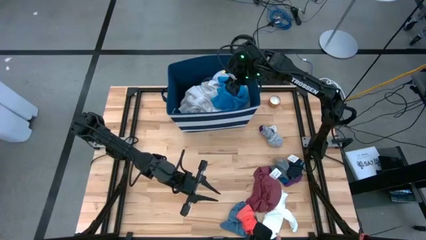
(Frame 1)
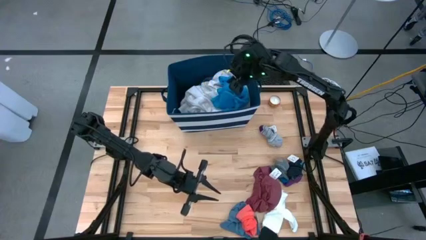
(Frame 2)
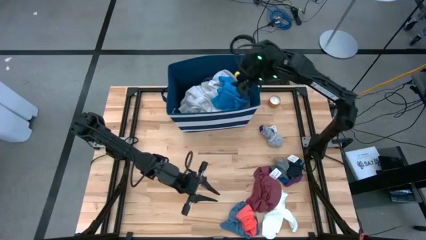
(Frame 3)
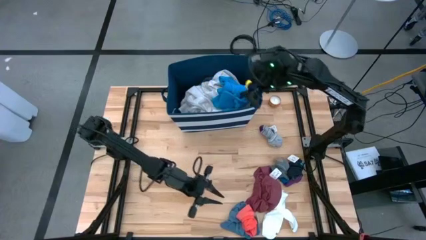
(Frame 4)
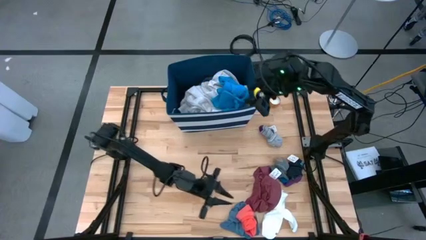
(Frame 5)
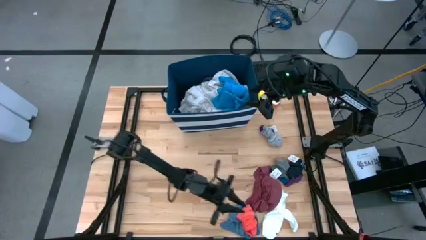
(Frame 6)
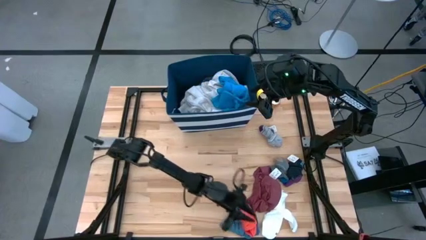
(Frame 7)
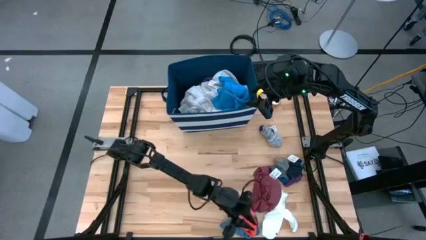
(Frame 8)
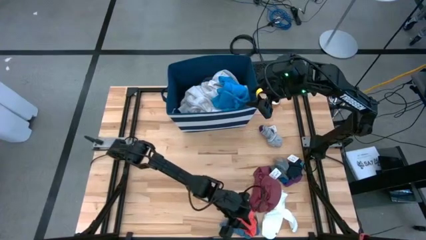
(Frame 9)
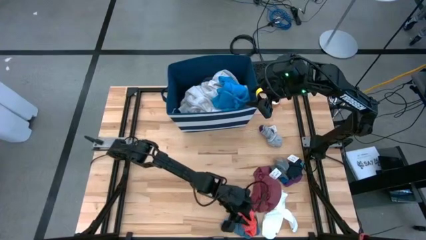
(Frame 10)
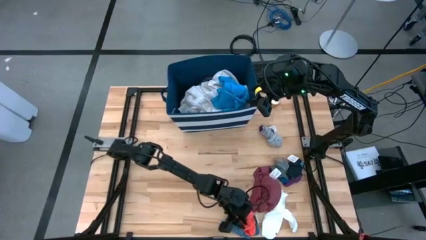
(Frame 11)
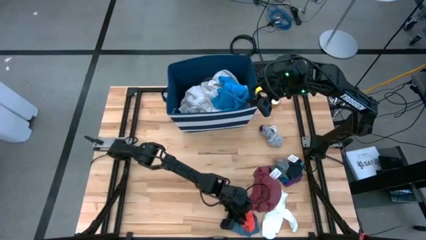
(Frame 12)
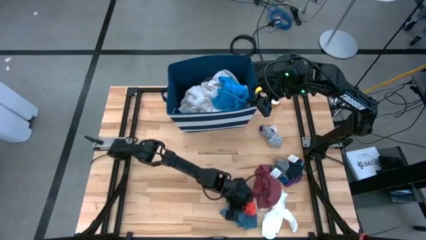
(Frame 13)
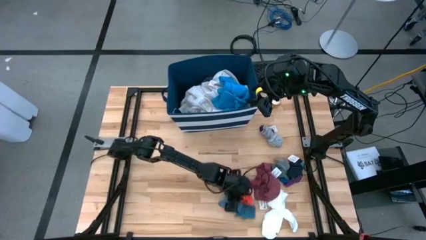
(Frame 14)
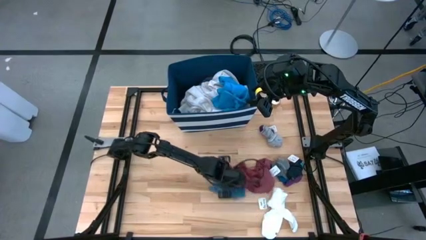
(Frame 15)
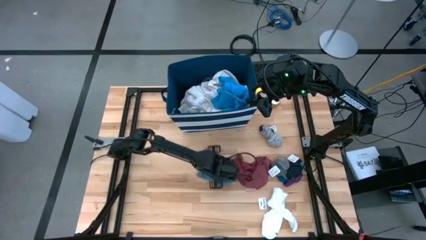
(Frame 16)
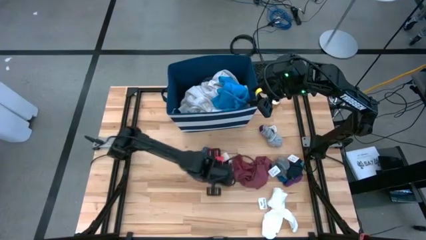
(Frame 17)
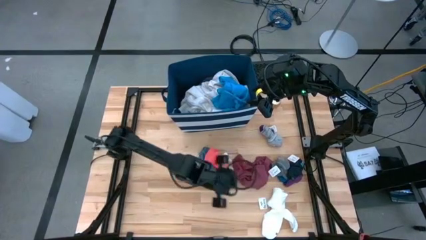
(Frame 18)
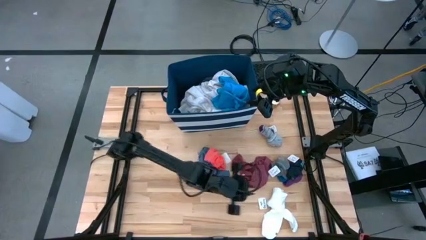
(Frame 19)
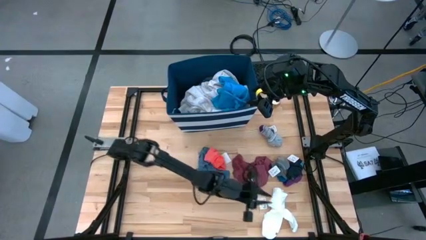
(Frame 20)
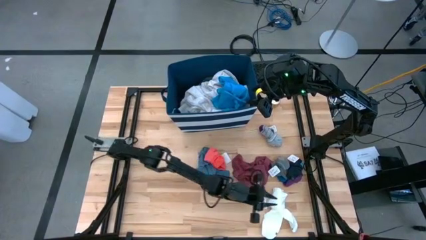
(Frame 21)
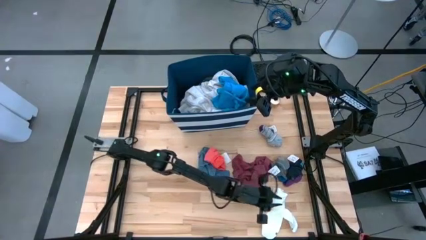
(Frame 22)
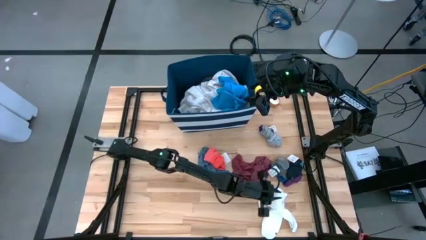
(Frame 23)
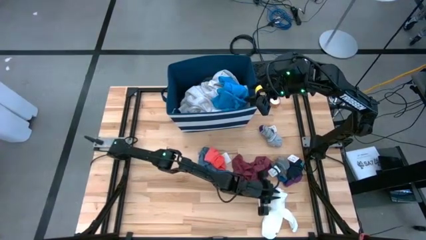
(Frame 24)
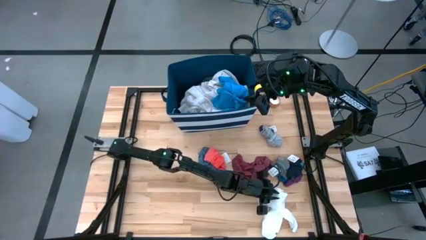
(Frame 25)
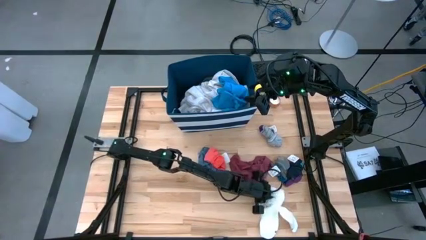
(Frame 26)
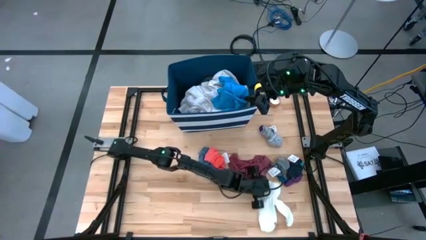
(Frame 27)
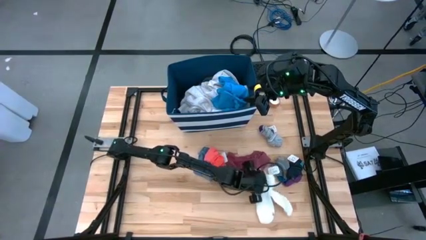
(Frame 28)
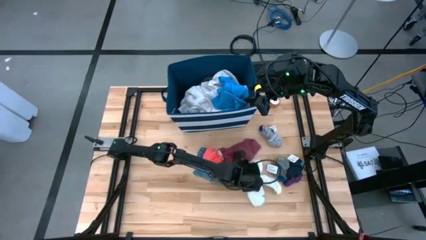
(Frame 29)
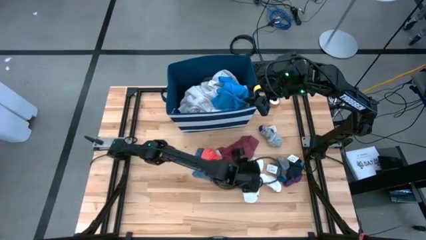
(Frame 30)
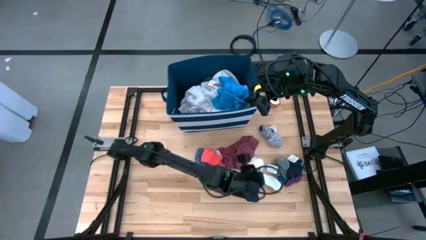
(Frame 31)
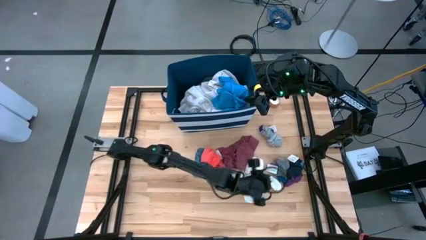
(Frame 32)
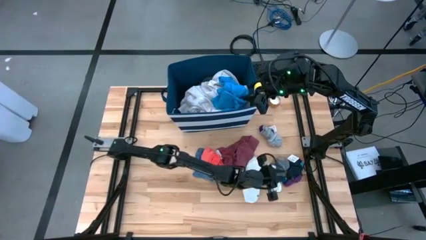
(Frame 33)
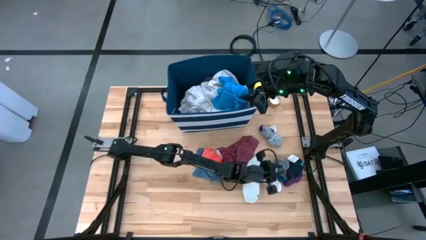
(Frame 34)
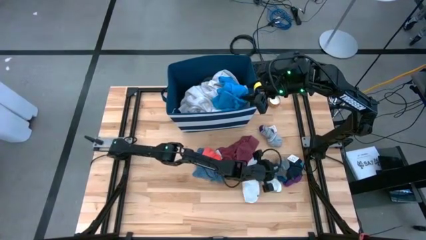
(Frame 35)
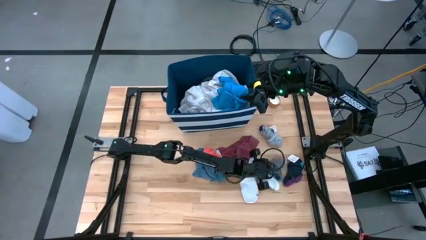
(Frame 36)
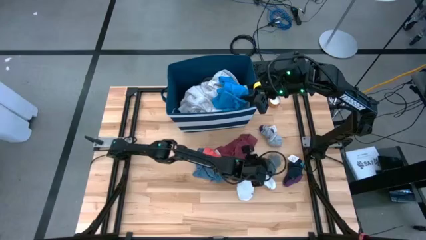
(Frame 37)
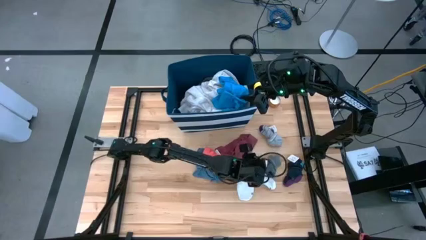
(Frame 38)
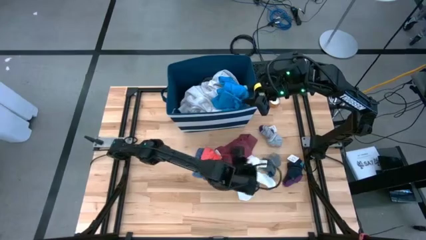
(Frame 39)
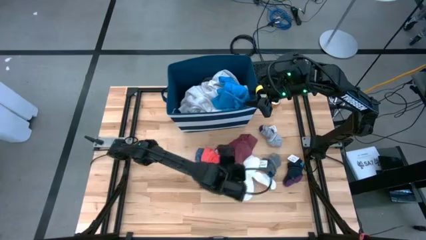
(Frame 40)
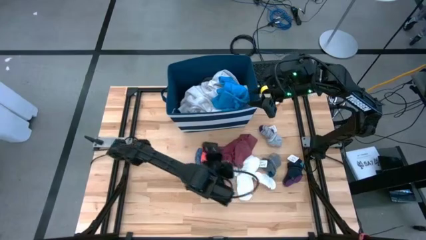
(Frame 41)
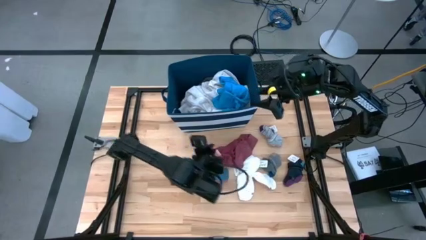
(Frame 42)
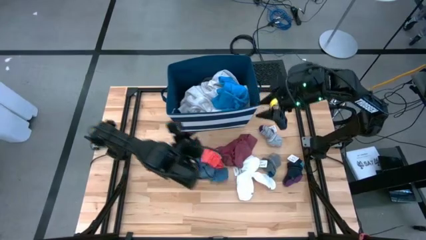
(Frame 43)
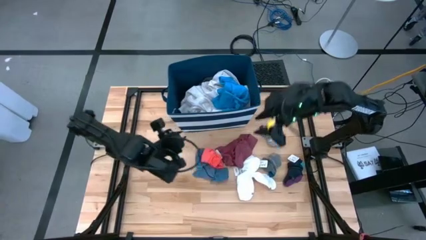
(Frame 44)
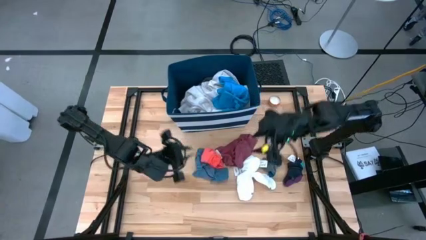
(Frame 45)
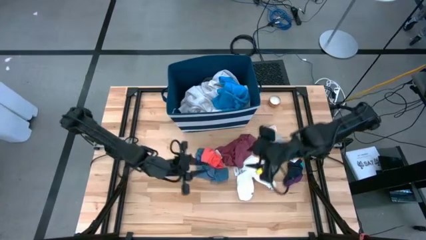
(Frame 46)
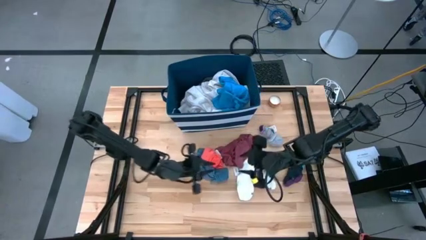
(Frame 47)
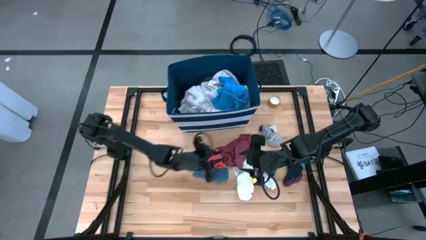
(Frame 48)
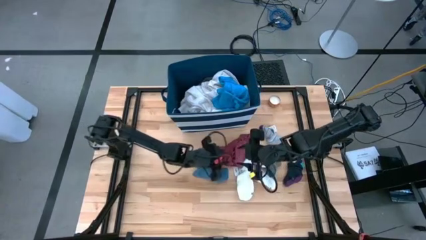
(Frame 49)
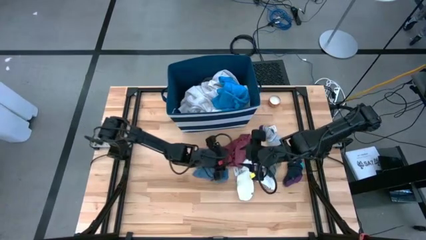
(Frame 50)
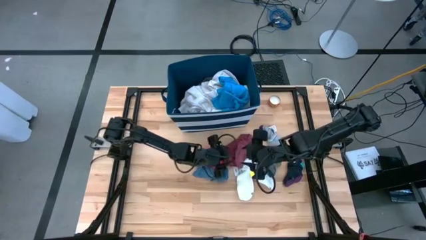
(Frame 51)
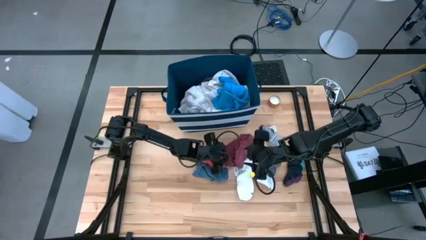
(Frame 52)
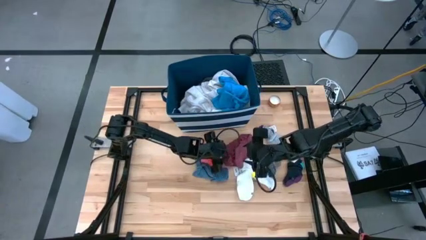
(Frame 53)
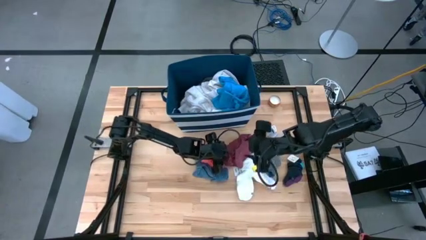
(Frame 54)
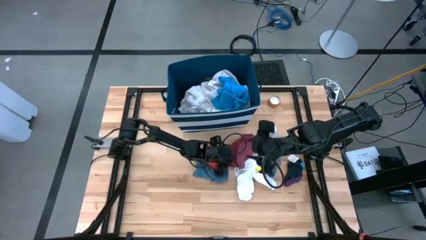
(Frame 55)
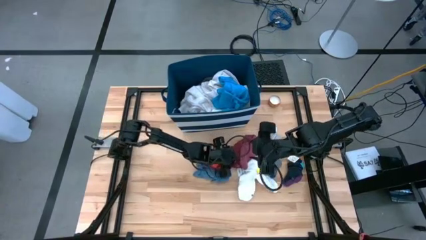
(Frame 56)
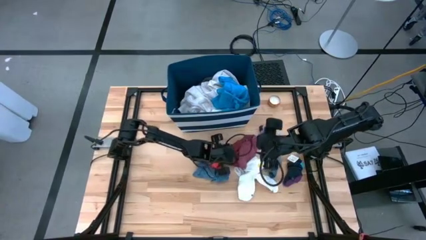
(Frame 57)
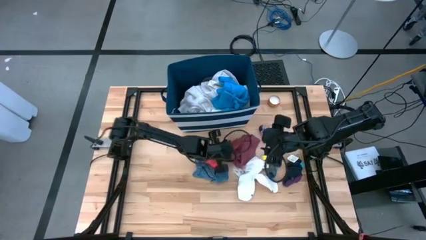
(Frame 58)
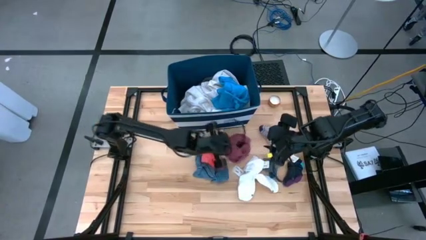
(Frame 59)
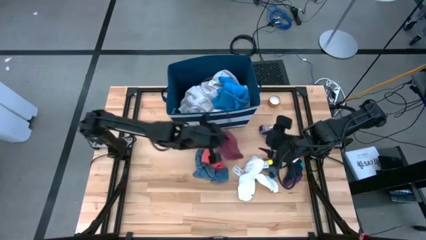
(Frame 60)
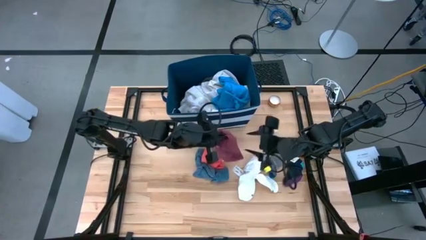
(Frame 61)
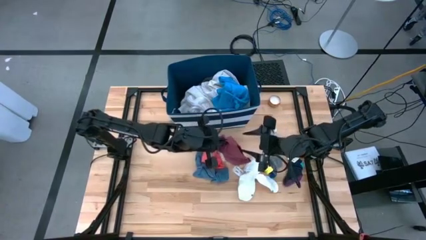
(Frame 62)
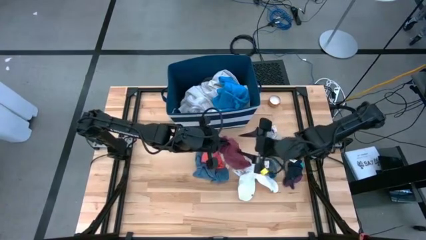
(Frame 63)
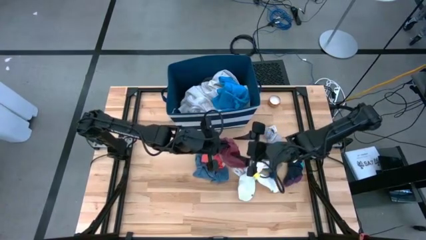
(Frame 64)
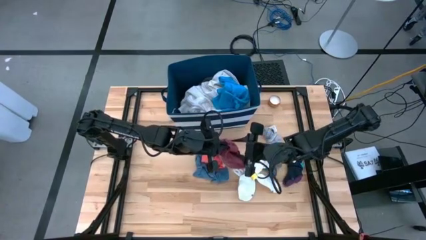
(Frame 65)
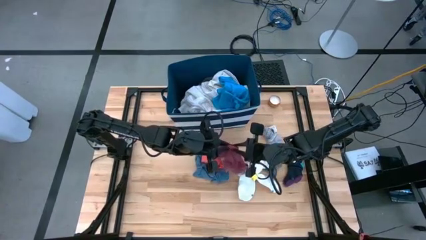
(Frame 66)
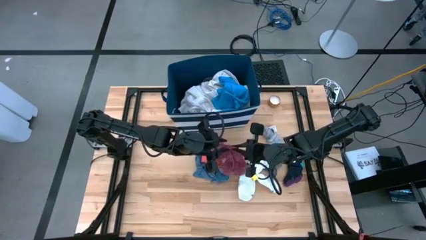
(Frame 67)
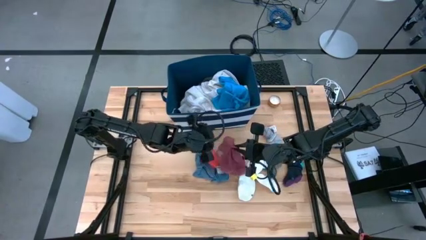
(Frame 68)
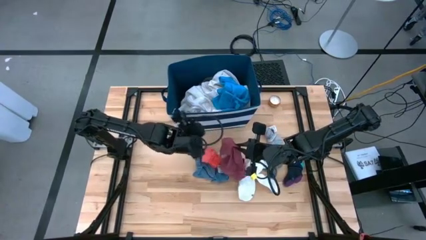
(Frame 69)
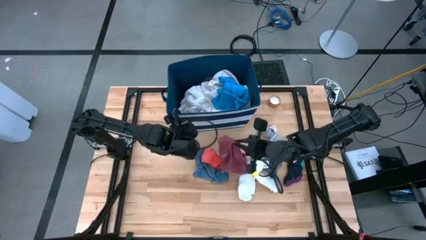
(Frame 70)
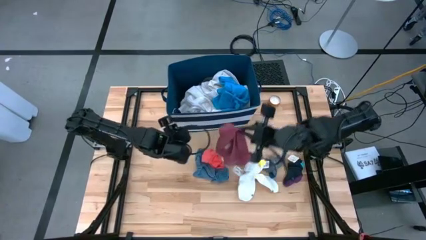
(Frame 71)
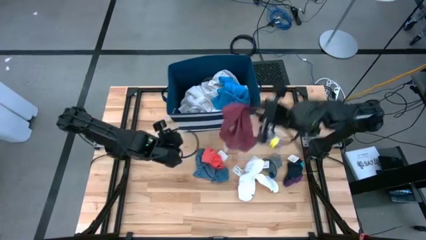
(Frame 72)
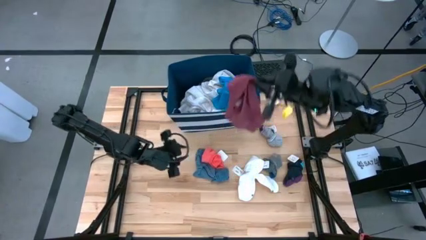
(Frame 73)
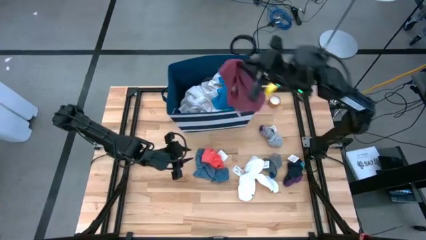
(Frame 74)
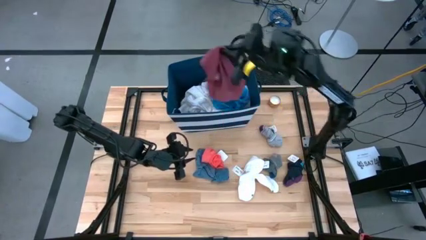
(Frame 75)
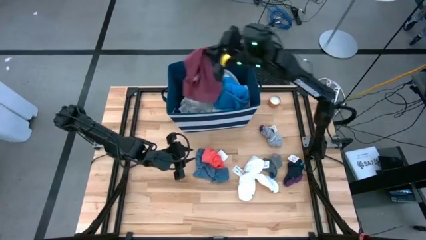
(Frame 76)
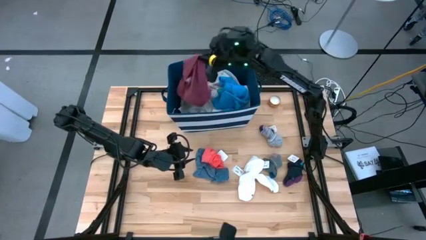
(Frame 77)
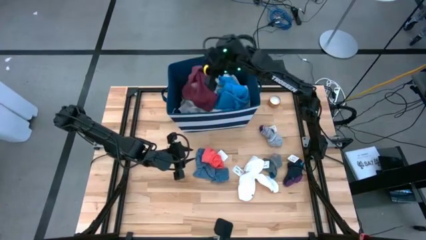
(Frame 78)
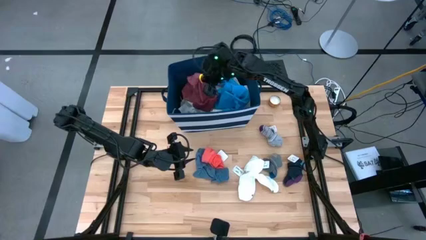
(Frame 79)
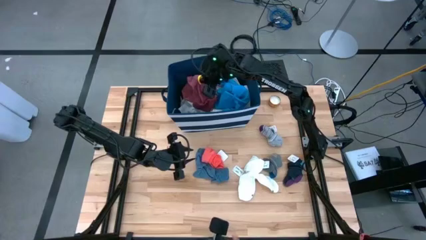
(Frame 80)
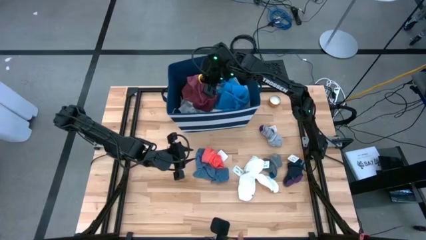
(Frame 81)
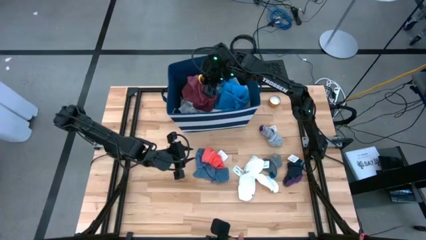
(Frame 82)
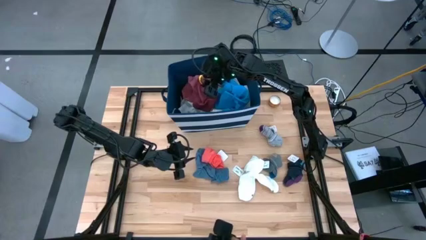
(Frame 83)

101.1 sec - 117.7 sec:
Task: Sort clothes
Put the red underwear into the blue laundry organizer
